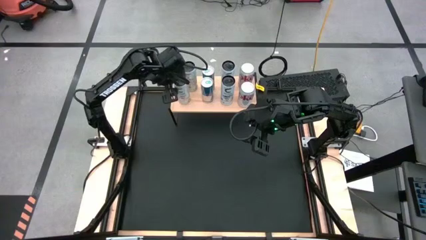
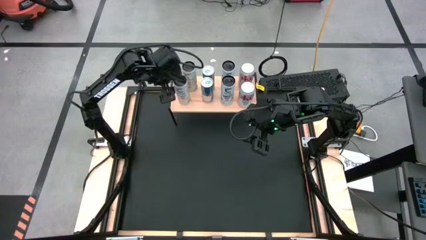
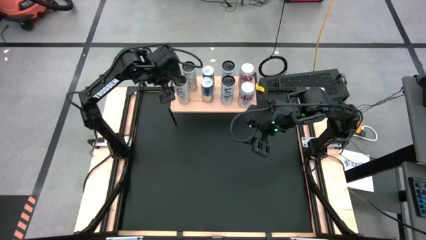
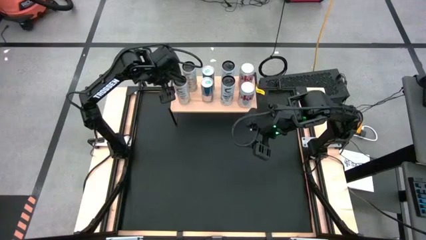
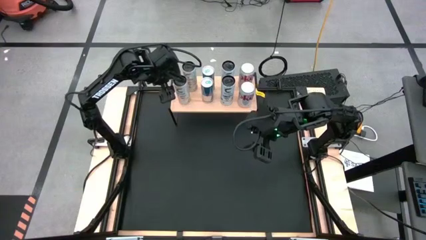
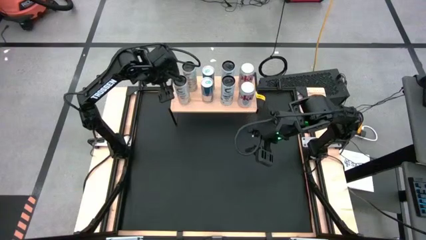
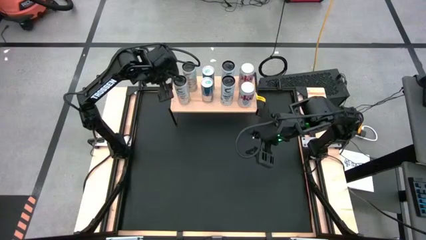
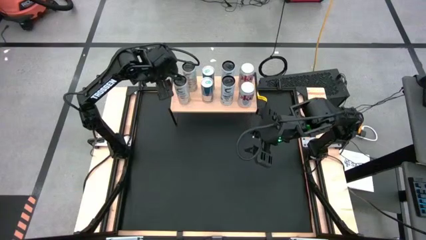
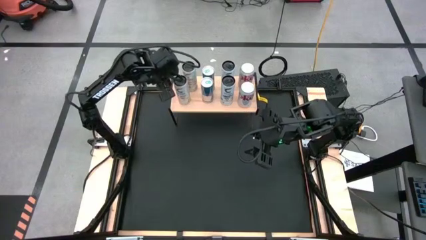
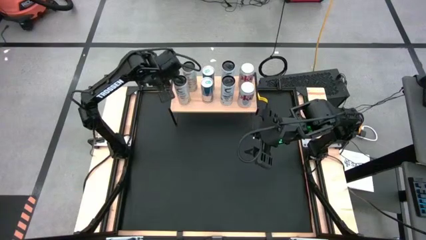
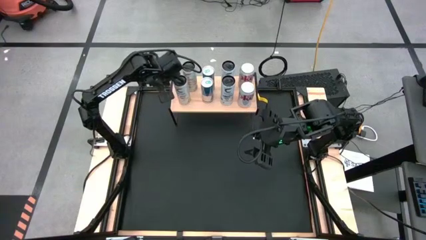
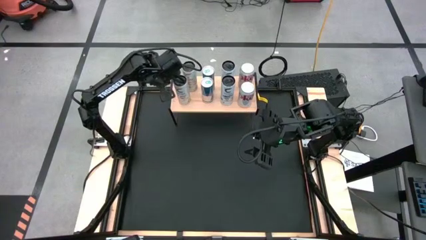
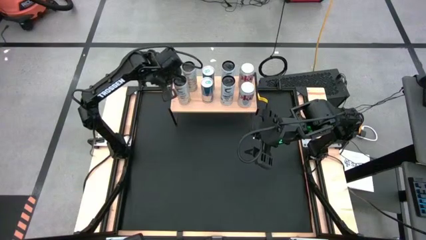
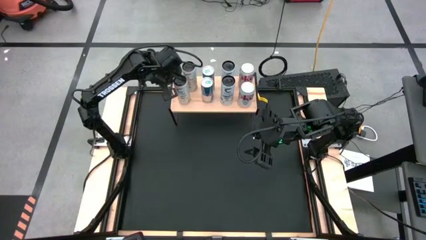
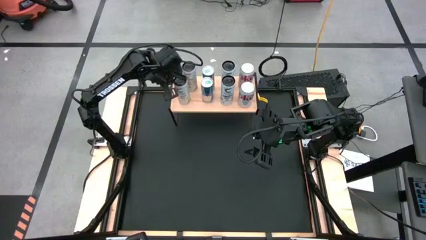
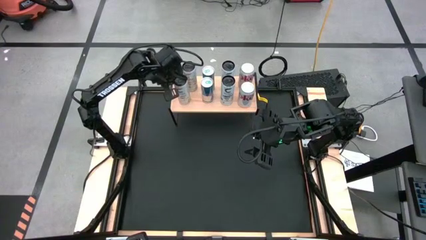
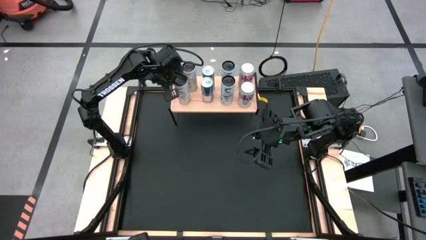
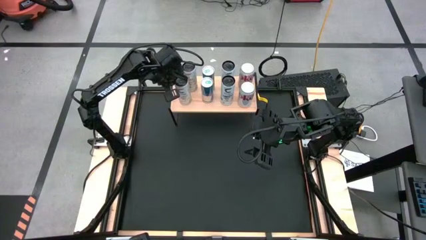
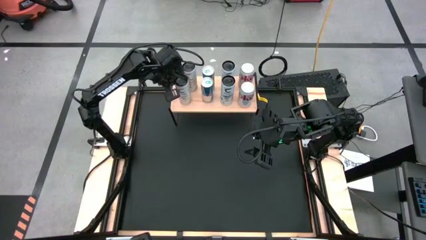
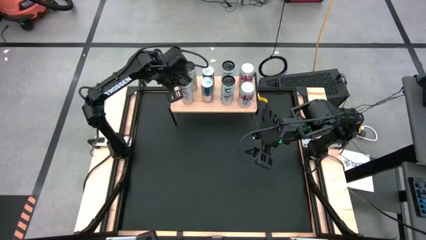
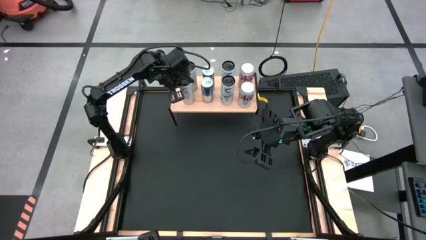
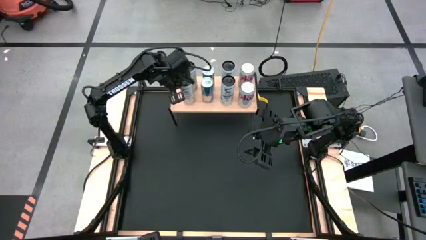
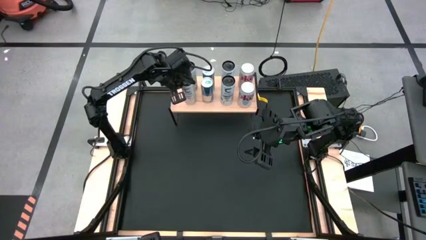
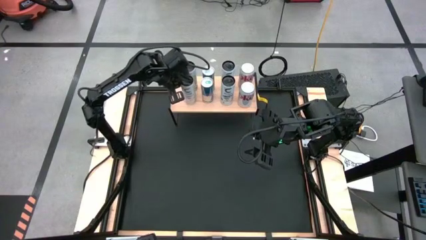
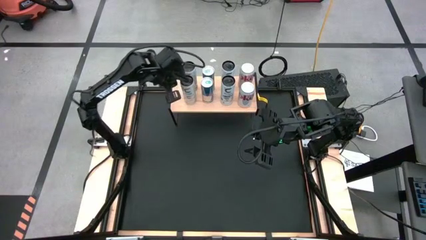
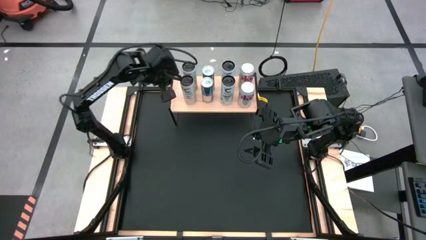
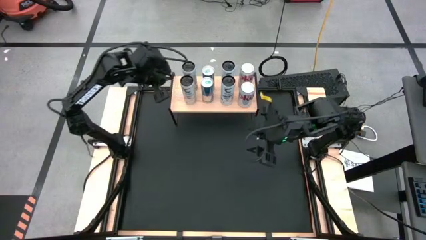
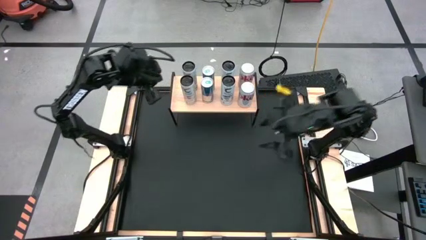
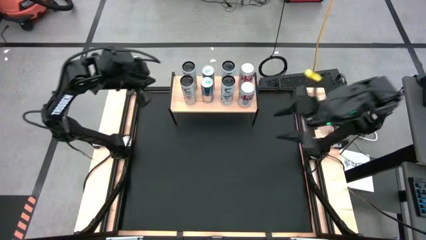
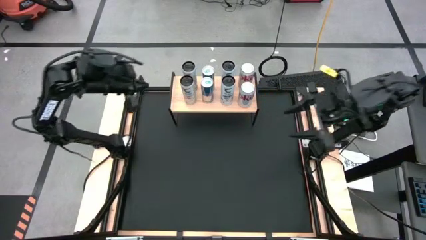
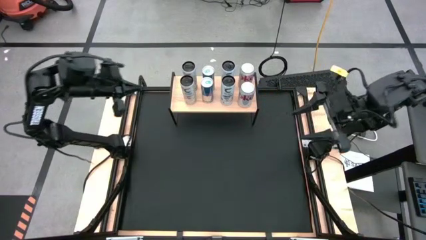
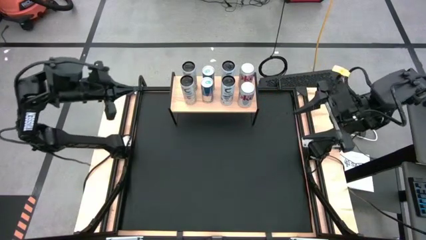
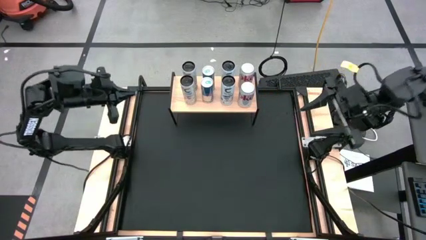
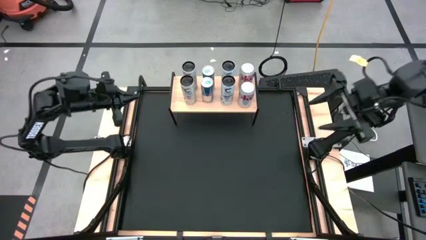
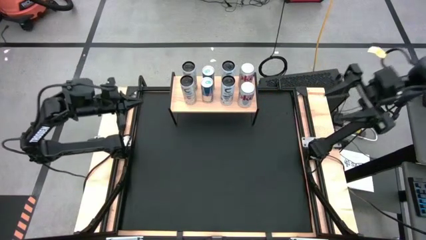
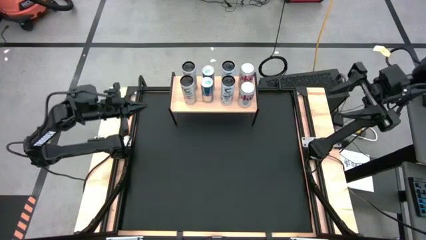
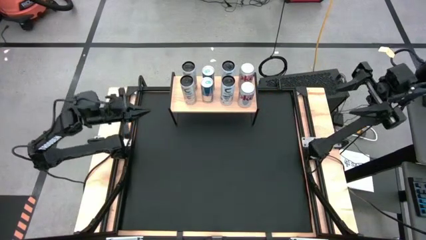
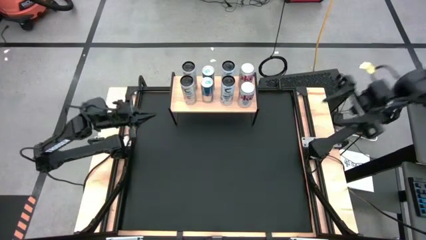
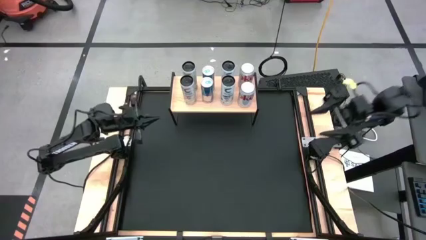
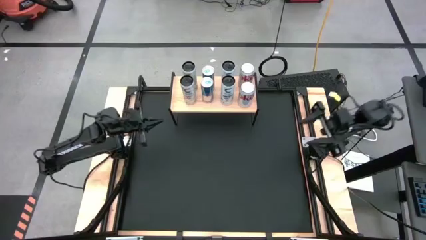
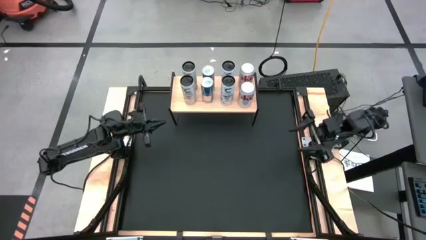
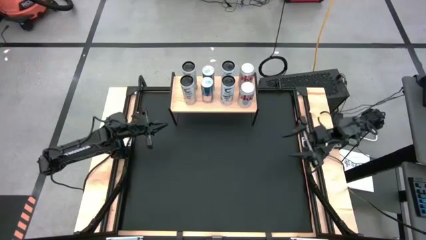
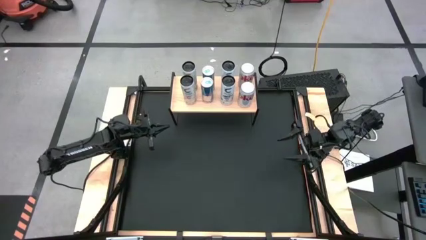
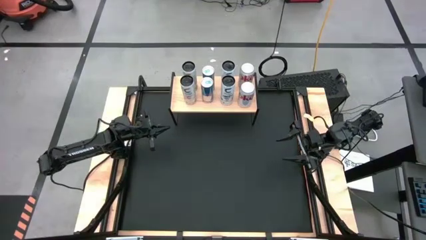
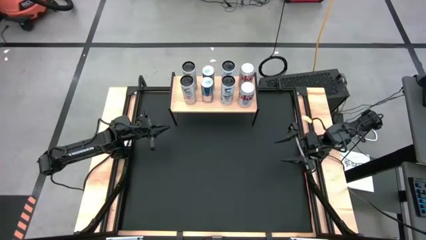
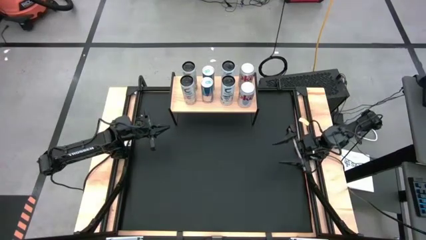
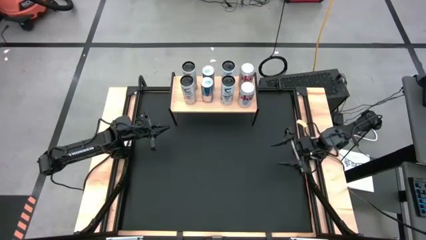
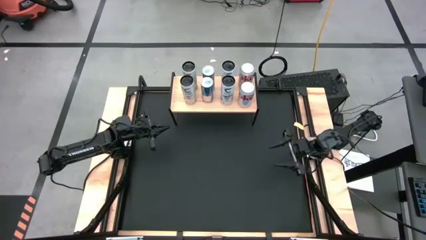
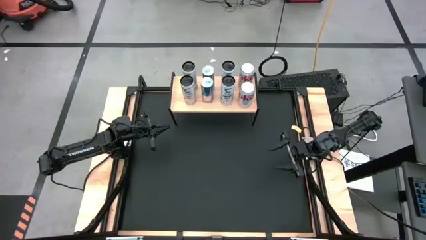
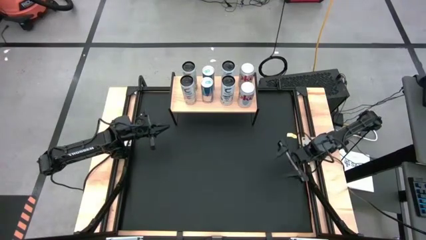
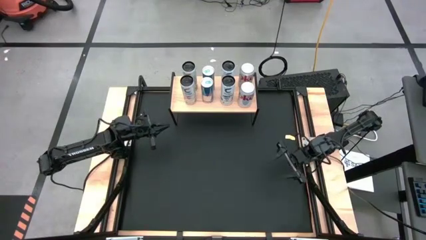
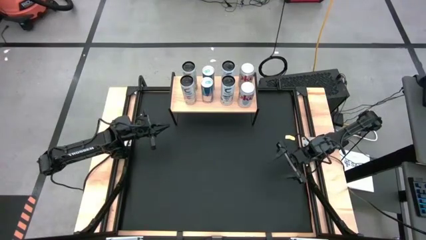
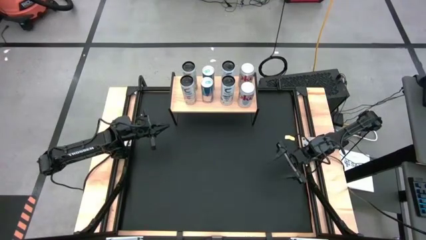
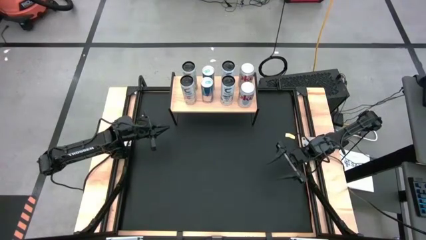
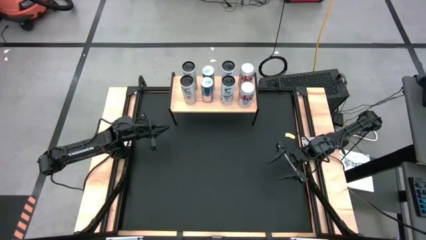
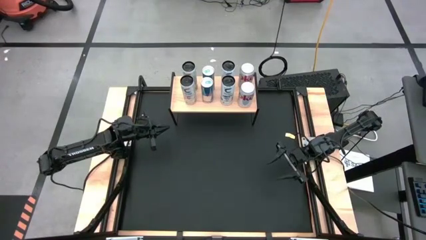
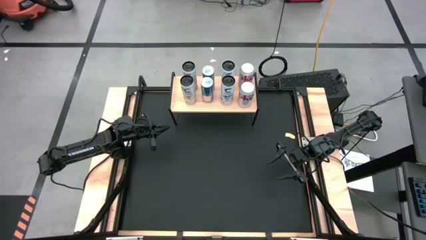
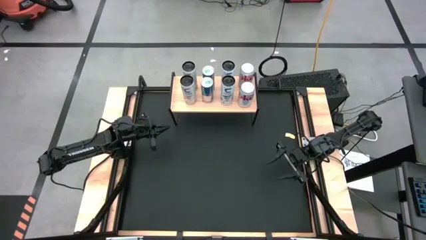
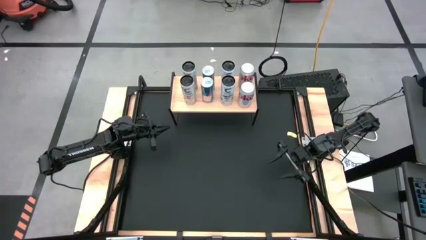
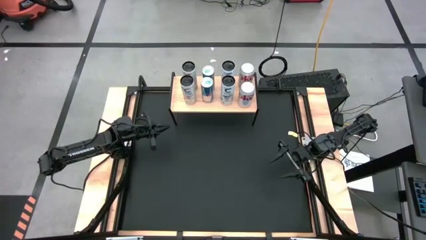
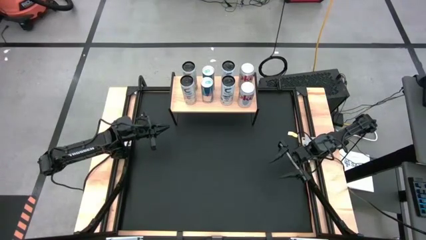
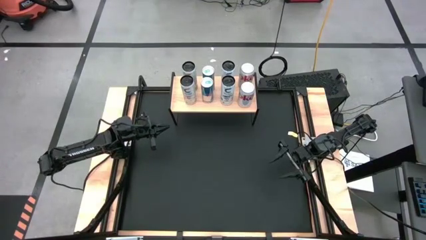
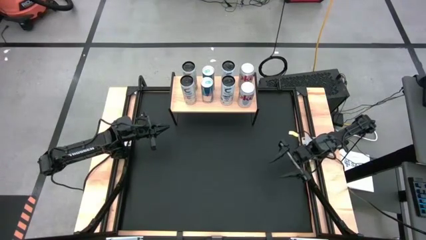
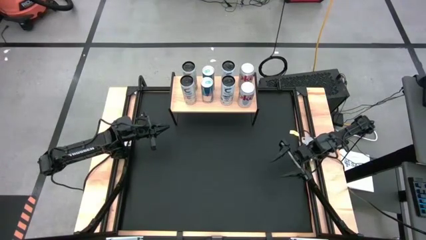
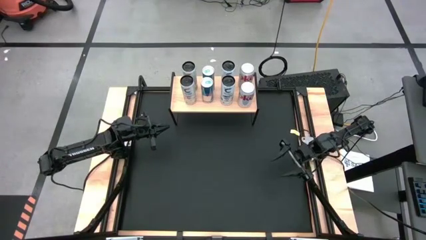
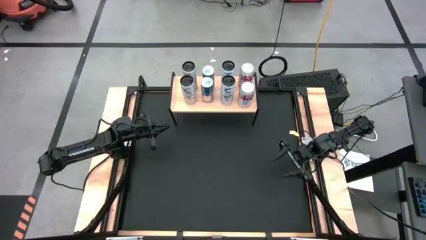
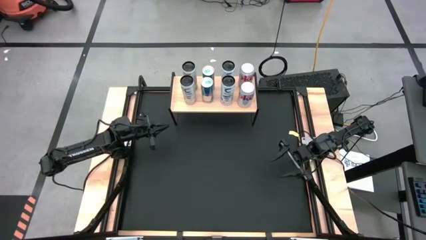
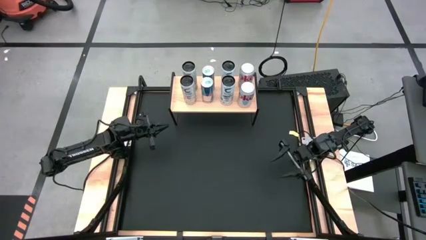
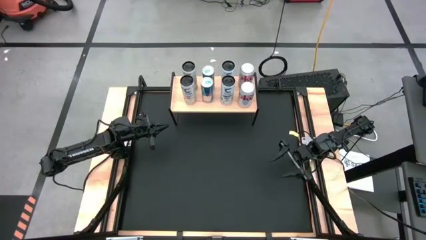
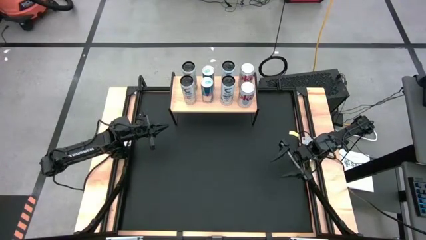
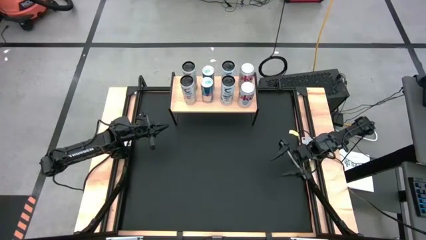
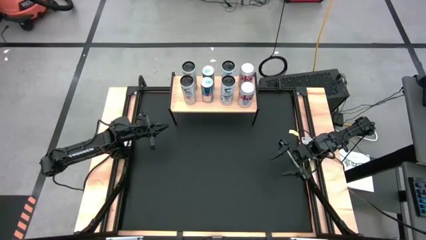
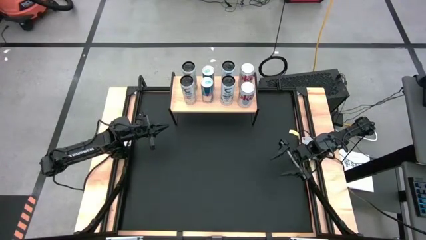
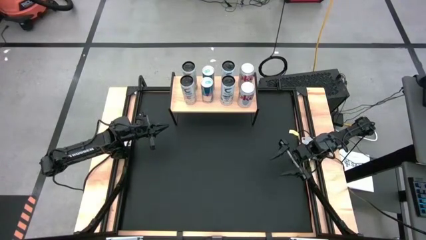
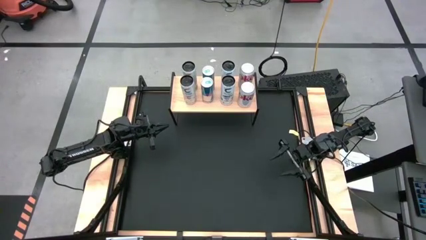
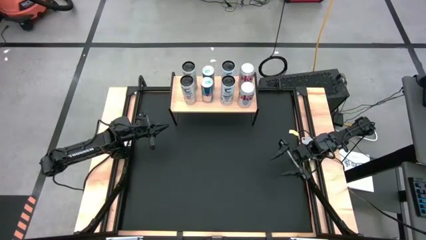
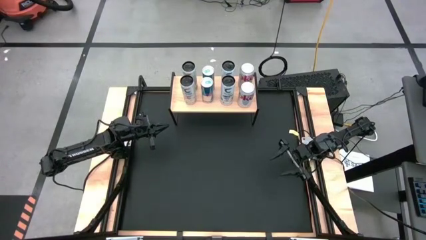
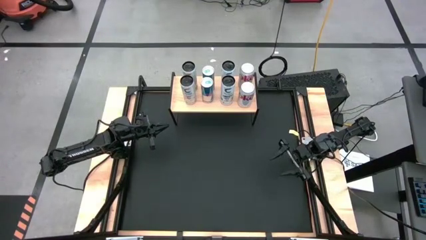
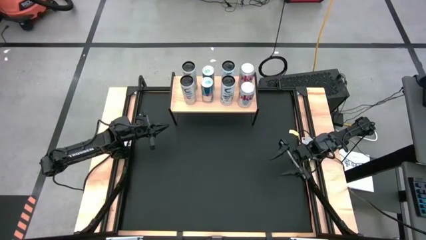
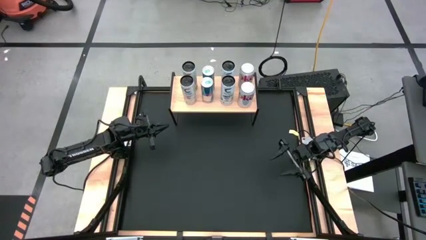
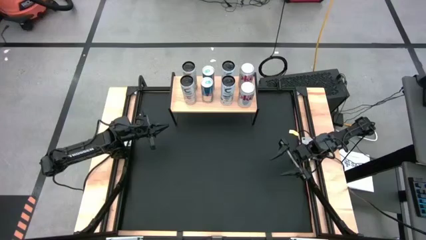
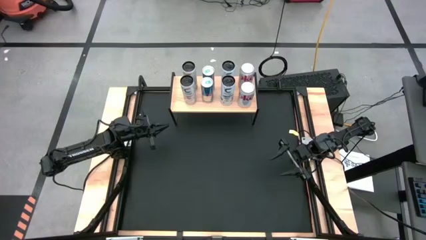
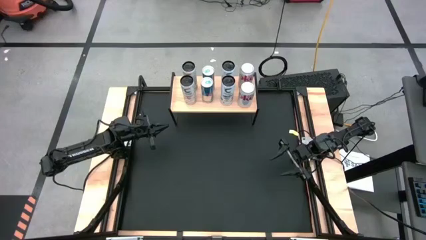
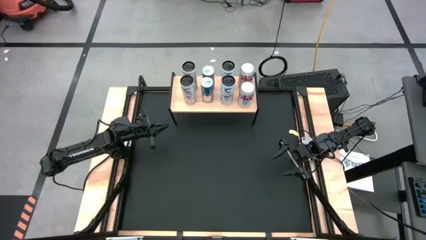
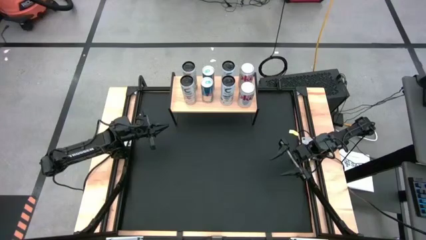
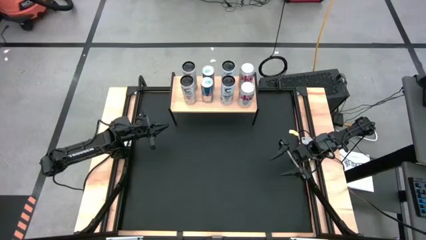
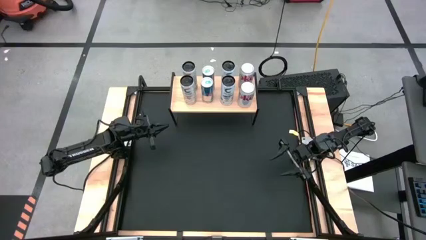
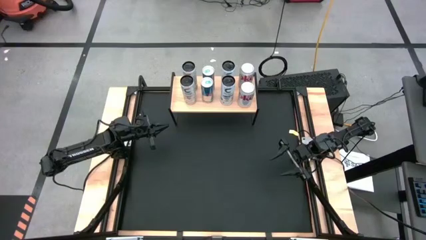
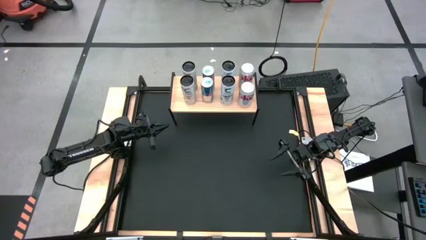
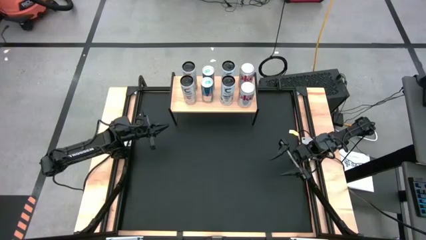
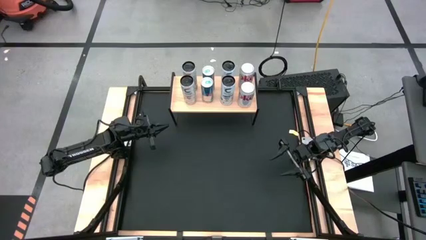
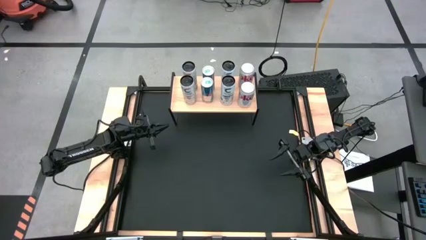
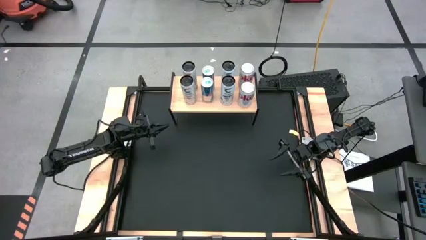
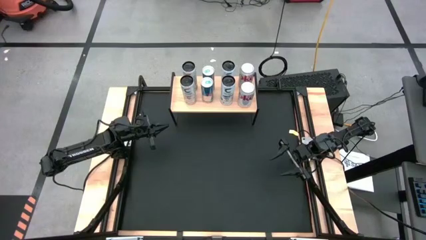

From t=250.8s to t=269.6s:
Task: Place canned beverage on shelf
Return to home position
